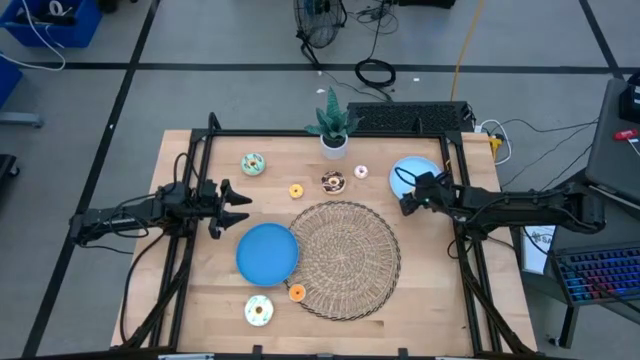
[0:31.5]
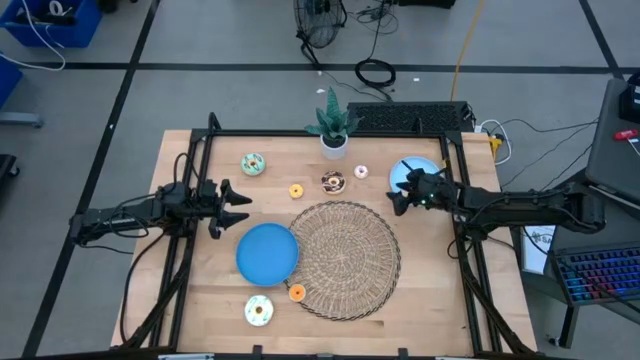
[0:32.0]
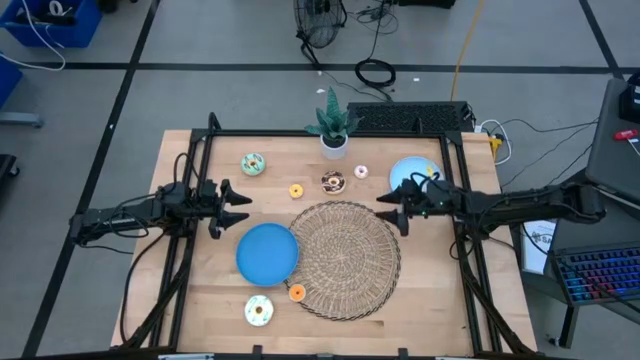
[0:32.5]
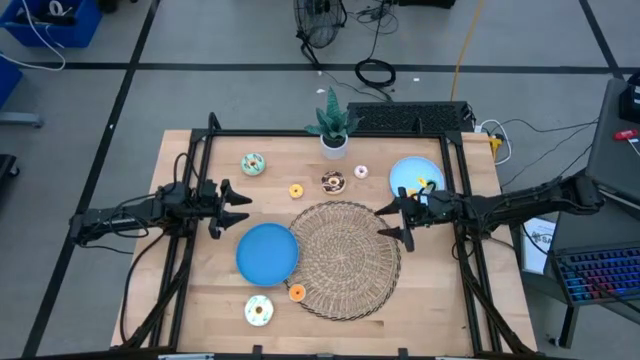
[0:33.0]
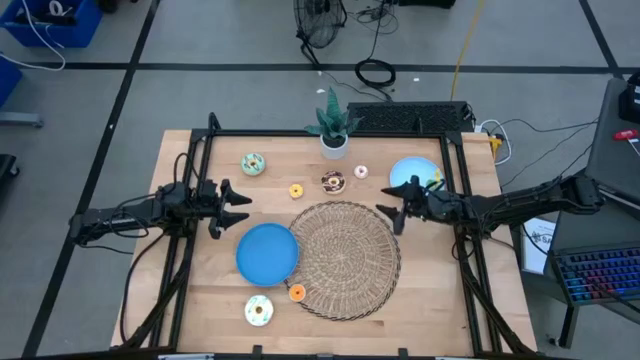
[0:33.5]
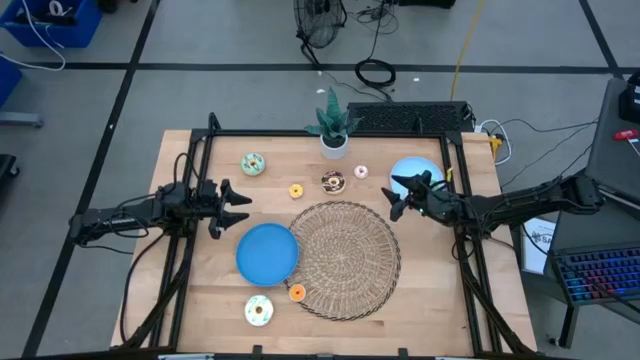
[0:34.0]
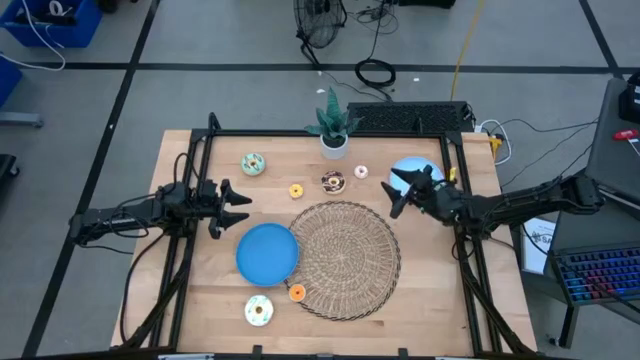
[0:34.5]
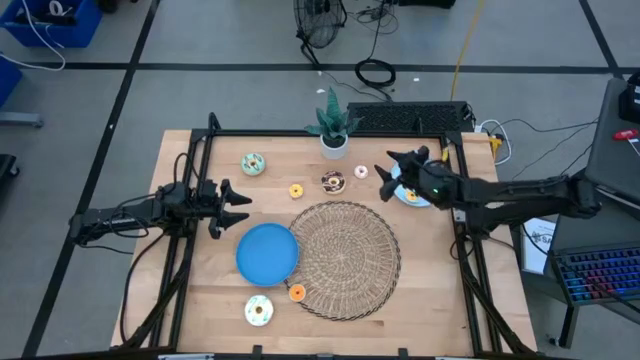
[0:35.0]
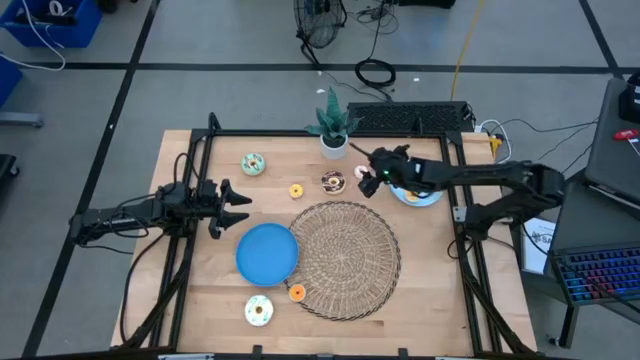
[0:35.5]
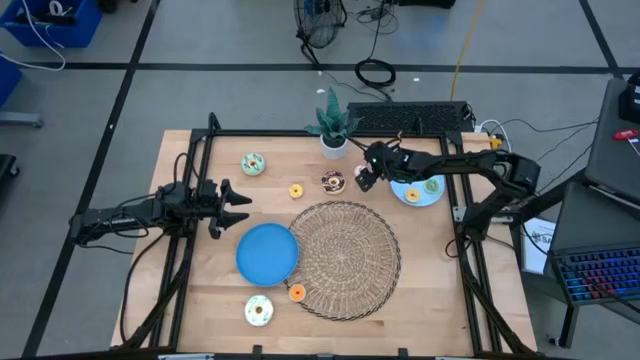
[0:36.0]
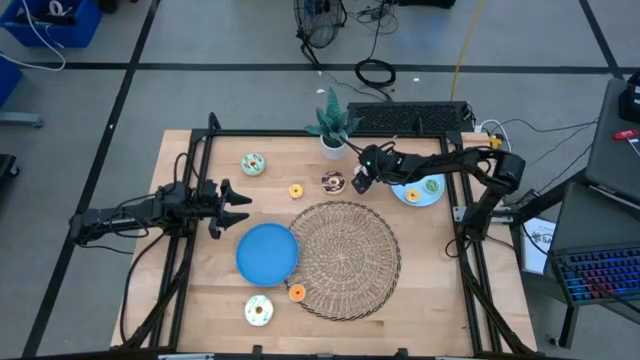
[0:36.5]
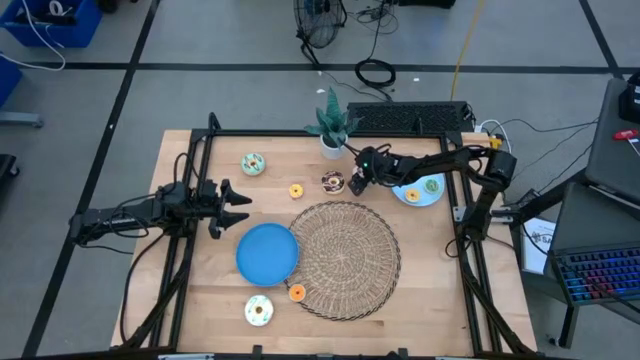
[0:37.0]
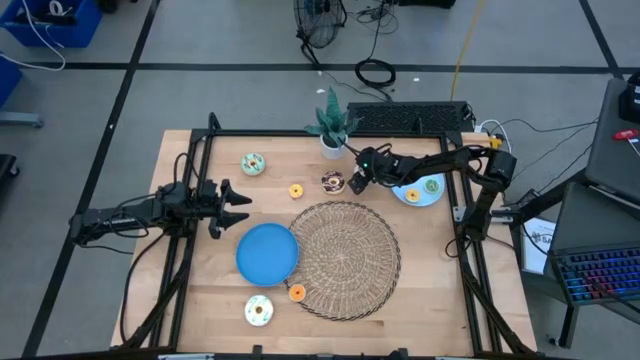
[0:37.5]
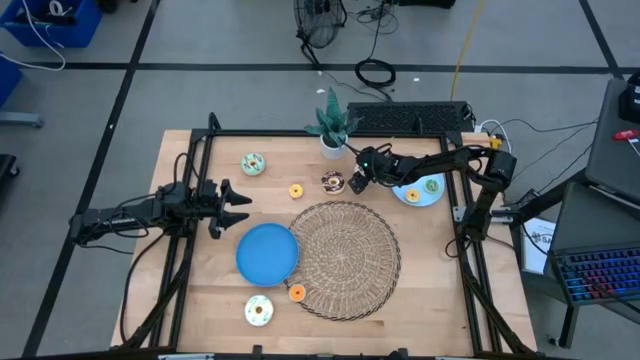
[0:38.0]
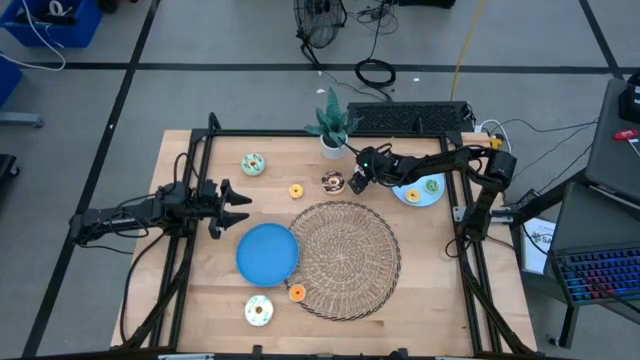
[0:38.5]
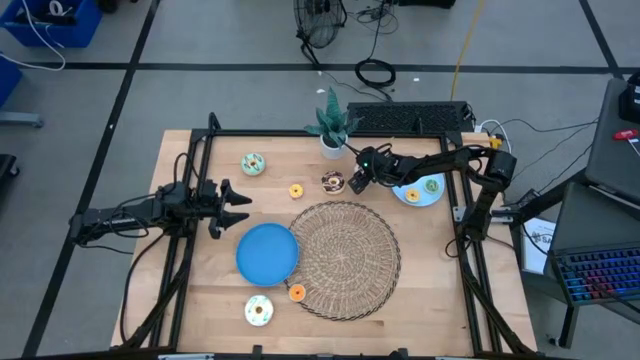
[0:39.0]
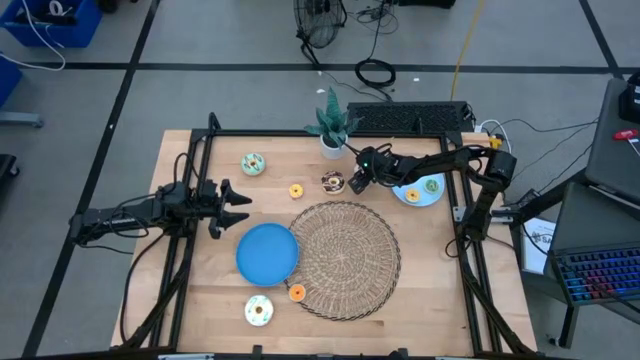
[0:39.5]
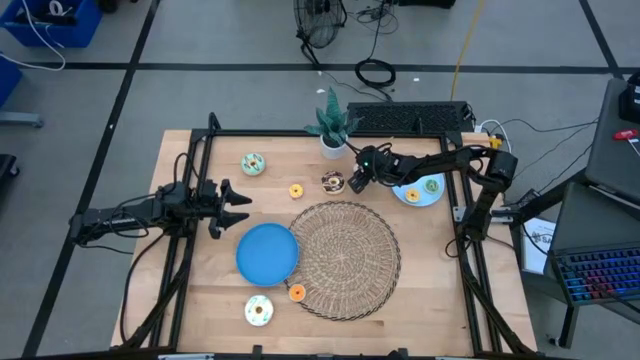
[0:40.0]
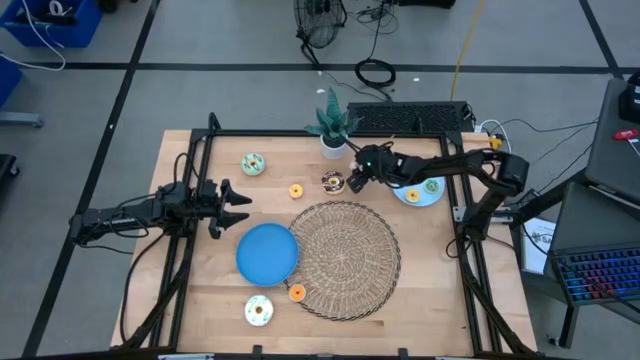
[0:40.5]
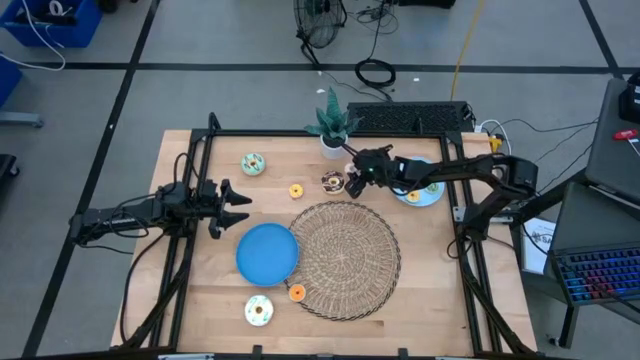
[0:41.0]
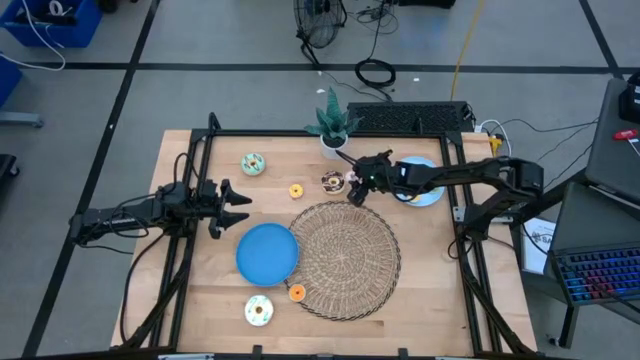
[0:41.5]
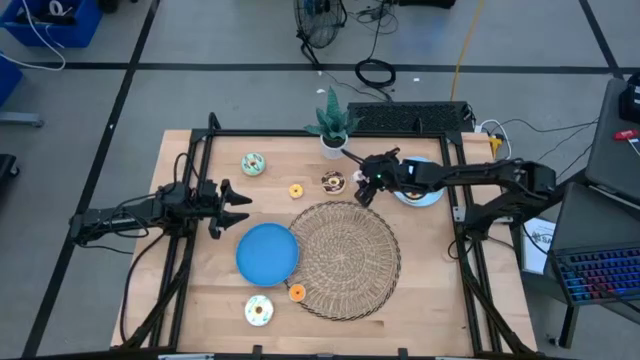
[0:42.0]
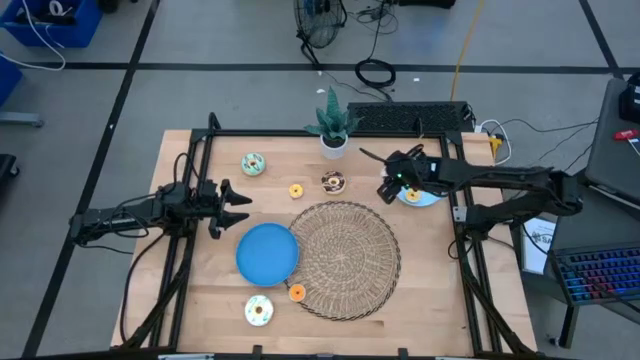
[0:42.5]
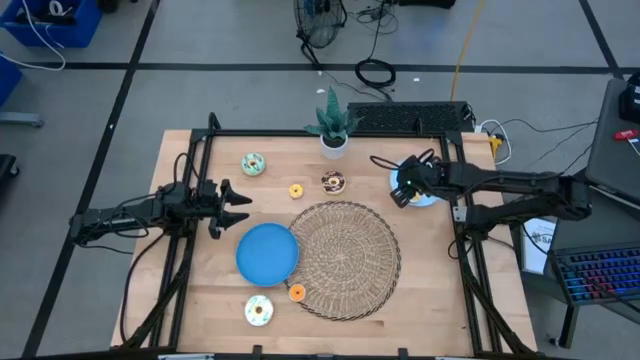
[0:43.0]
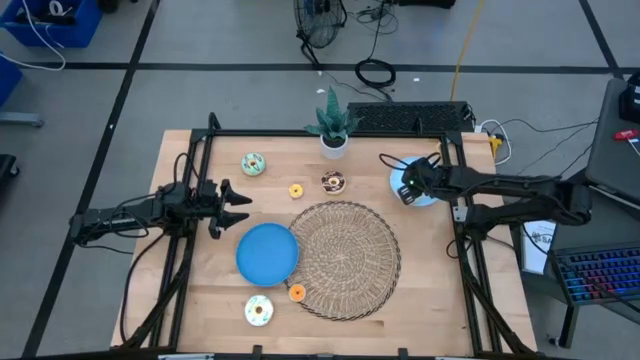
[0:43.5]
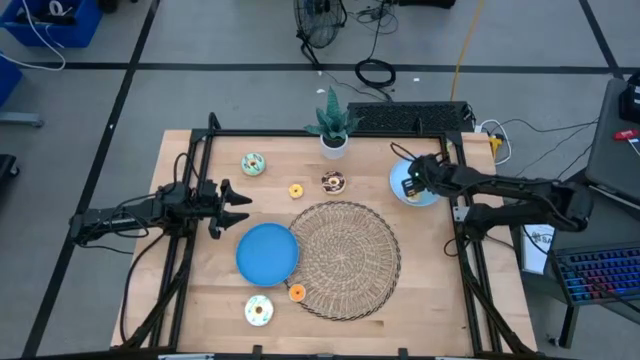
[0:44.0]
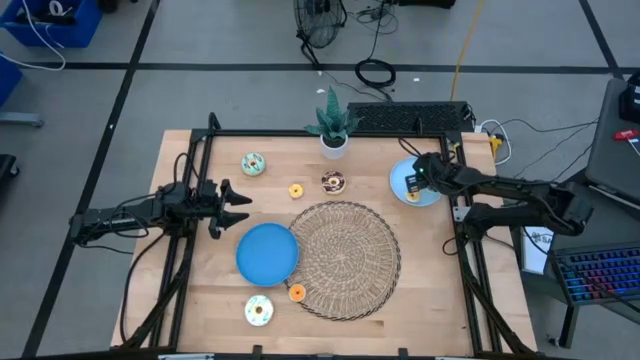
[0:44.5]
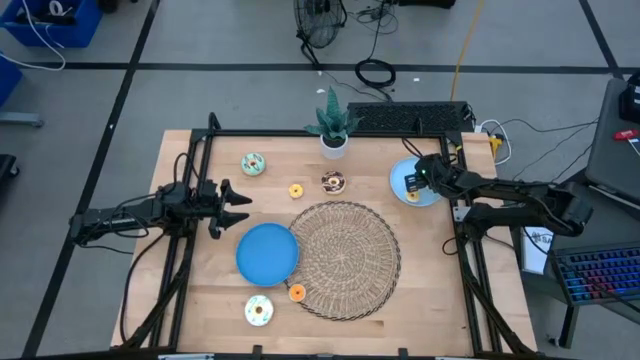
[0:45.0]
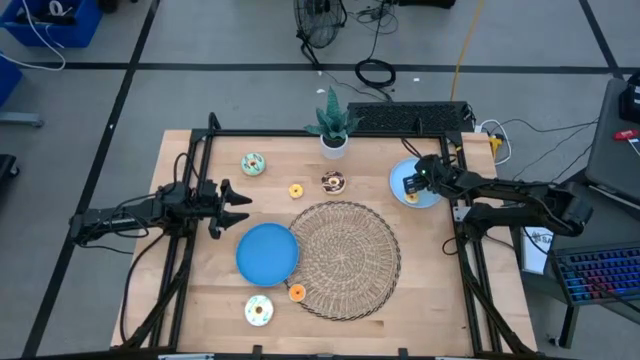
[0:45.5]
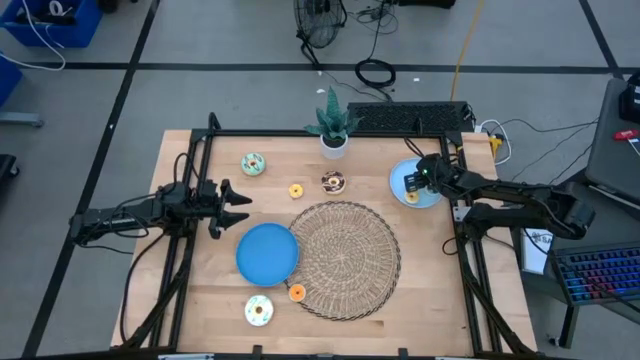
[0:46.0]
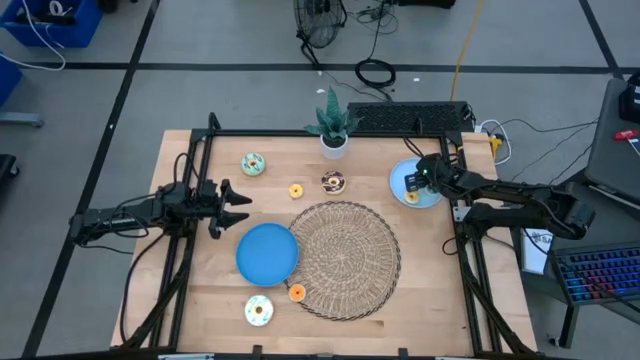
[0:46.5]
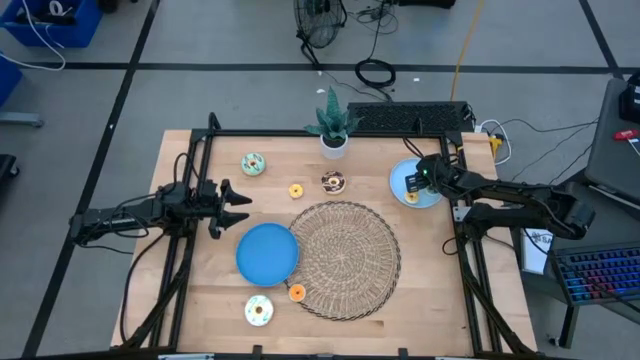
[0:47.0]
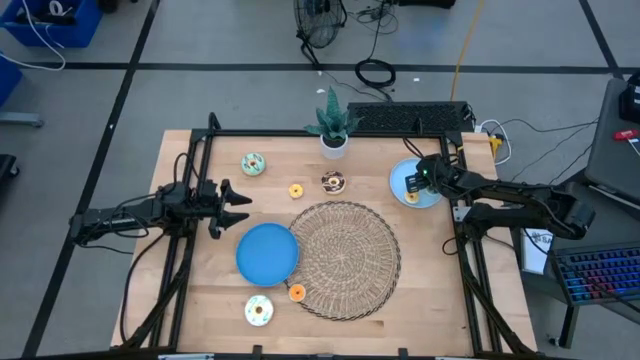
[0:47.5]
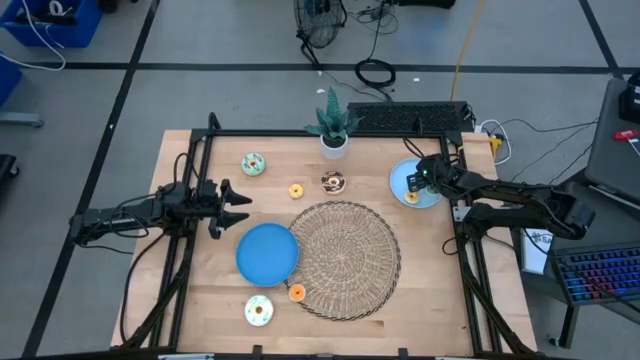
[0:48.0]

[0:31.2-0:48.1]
Task: Pick & Place donuts
Put the small white donut on the light blue plate

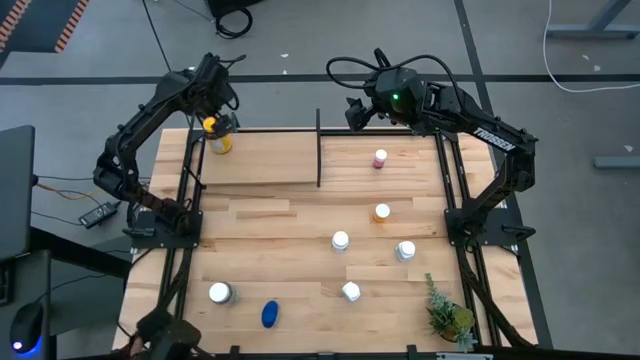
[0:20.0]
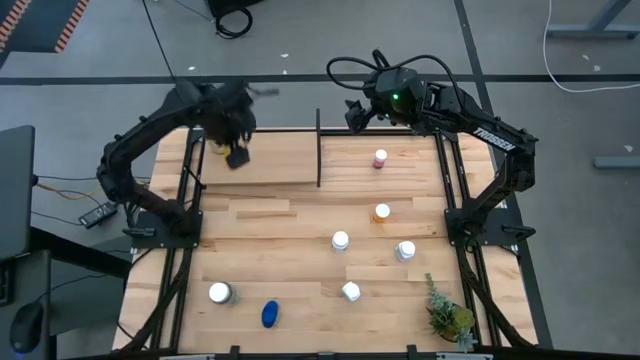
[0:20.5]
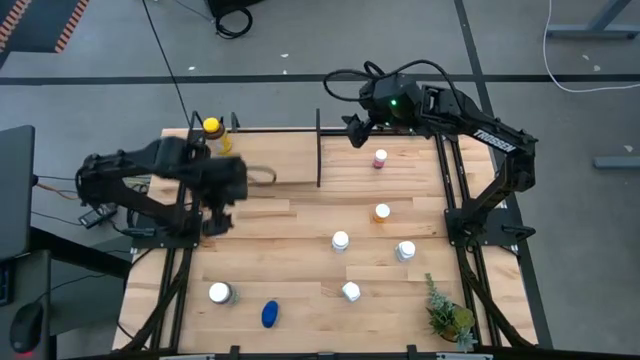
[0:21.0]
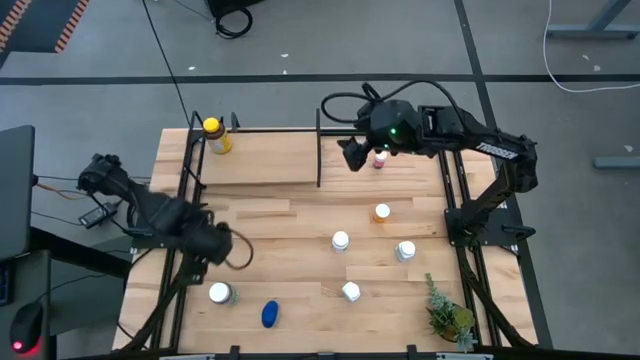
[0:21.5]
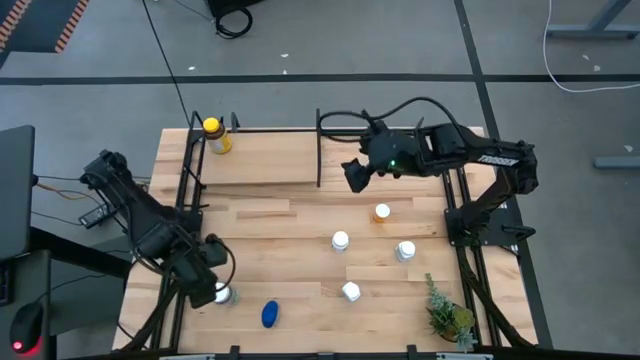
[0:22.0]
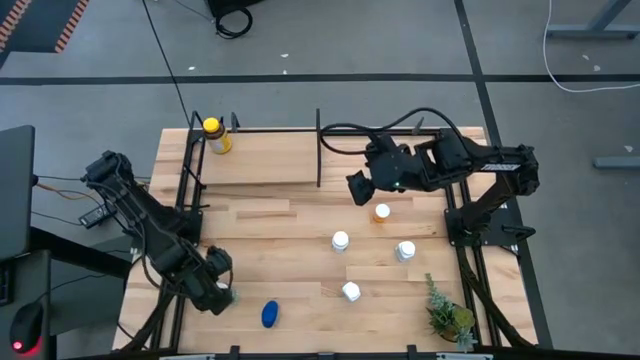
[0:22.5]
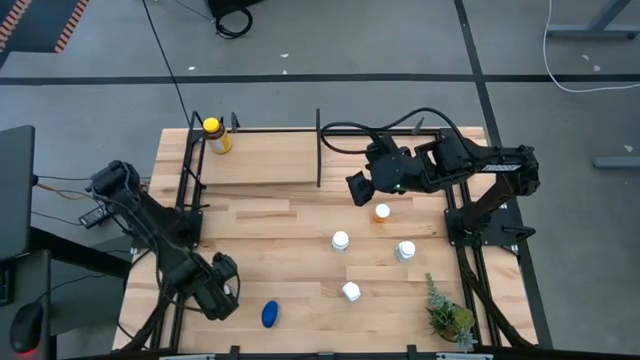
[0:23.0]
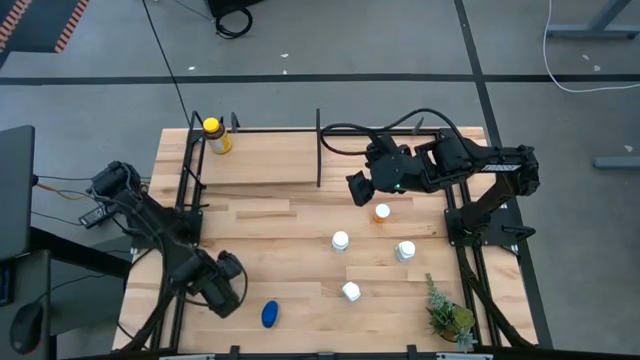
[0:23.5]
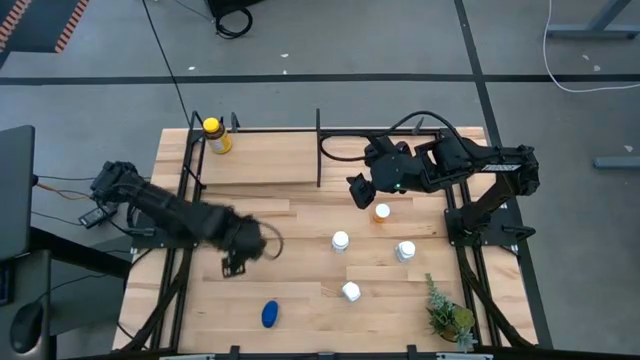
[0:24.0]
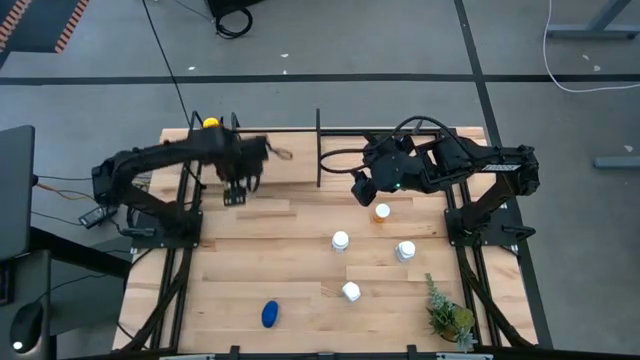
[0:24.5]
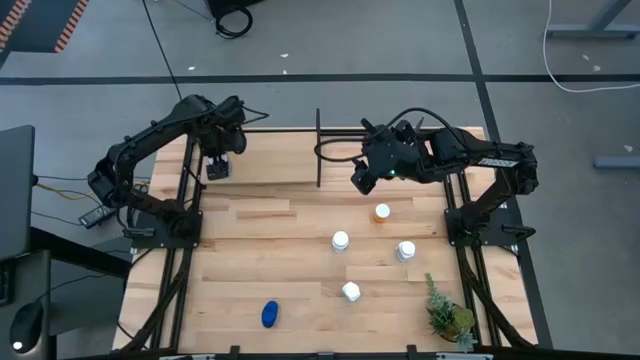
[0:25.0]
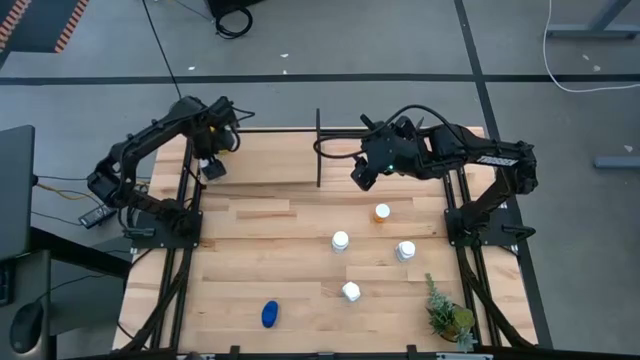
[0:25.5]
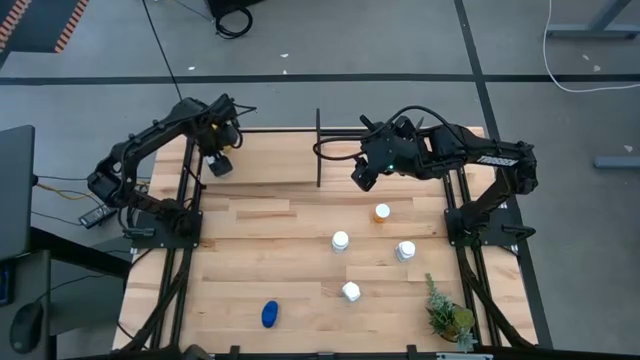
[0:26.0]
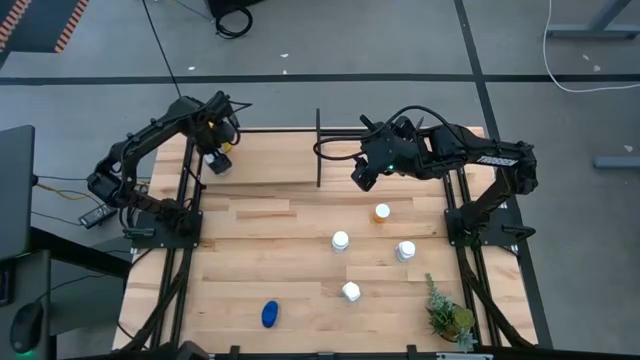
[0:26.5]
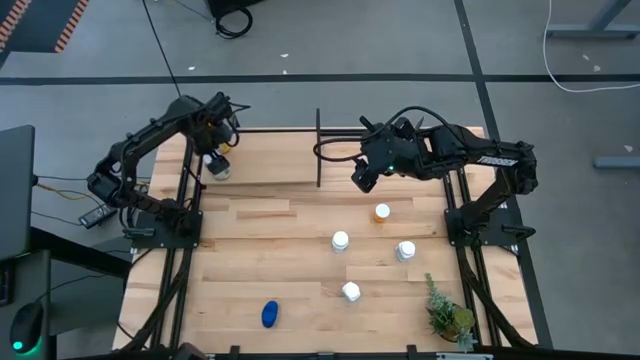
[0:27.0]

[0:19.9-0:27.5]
Task: Pick and place medicine bottles onto shelf by color
Put the green medicine bottle on the shelf
